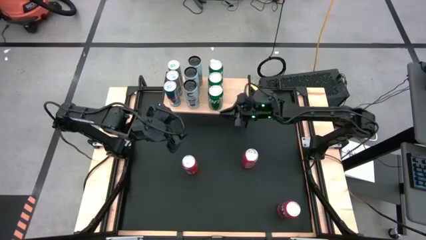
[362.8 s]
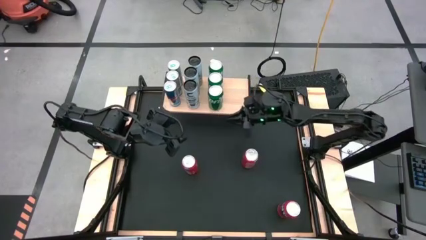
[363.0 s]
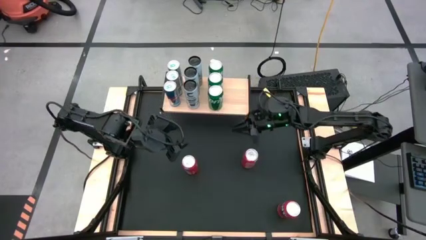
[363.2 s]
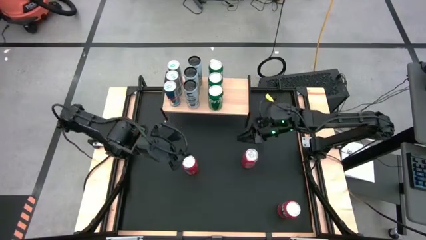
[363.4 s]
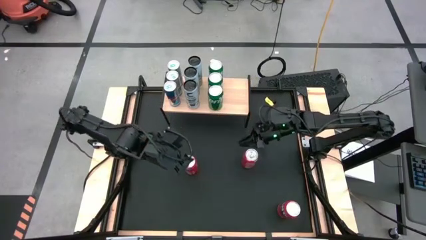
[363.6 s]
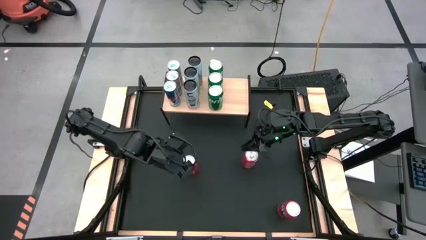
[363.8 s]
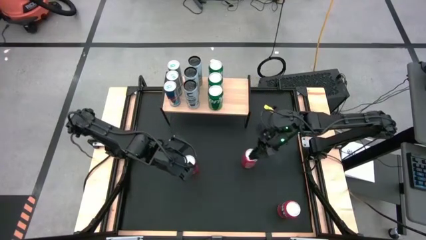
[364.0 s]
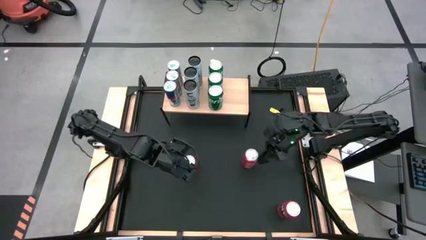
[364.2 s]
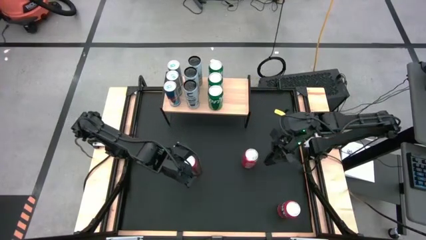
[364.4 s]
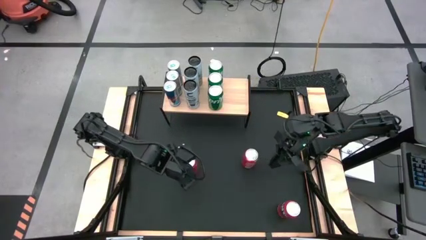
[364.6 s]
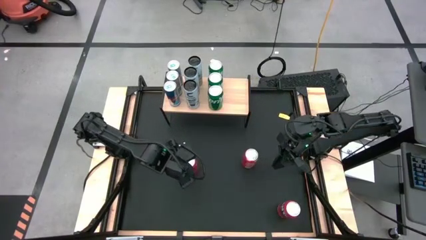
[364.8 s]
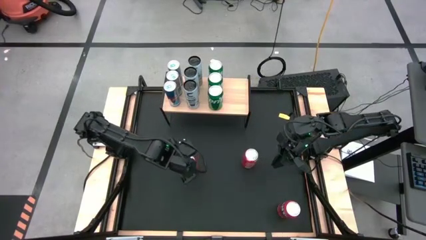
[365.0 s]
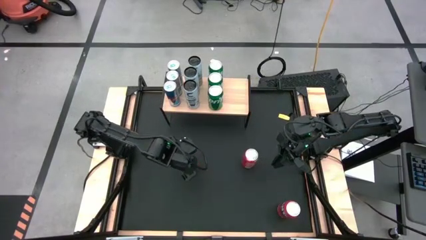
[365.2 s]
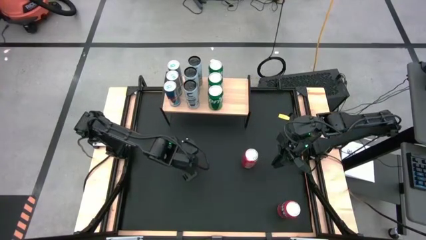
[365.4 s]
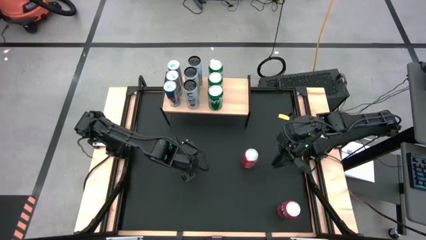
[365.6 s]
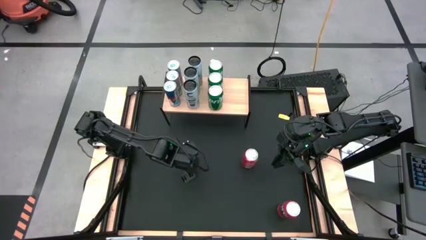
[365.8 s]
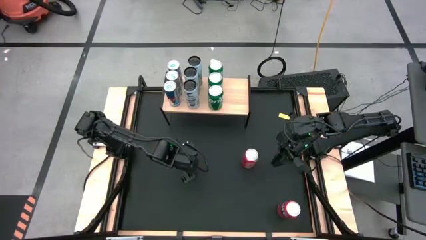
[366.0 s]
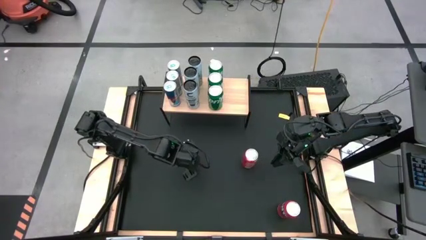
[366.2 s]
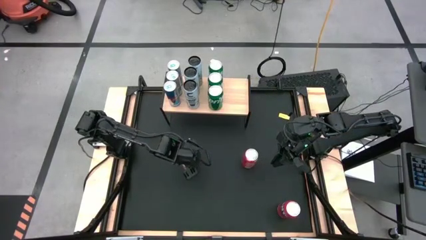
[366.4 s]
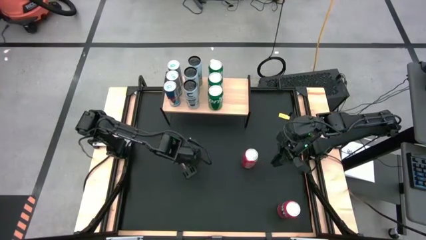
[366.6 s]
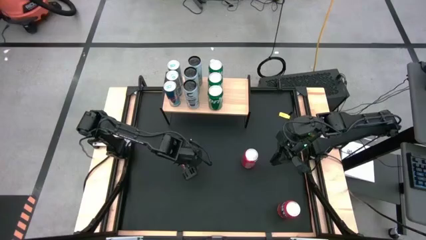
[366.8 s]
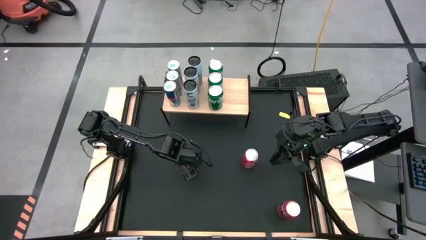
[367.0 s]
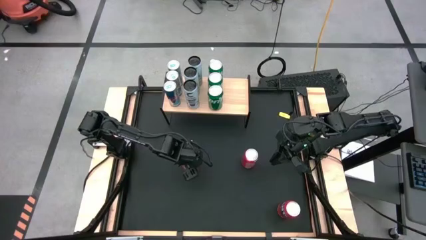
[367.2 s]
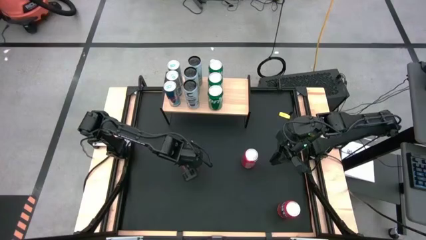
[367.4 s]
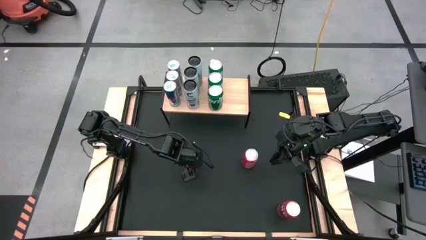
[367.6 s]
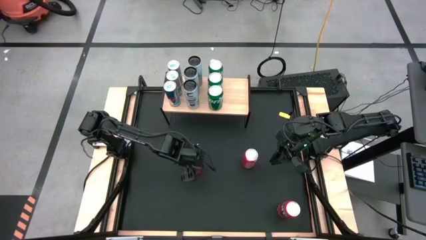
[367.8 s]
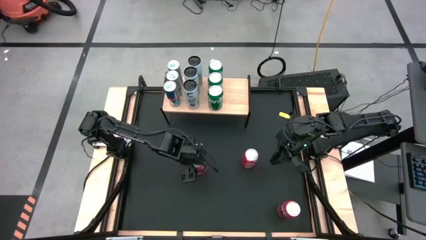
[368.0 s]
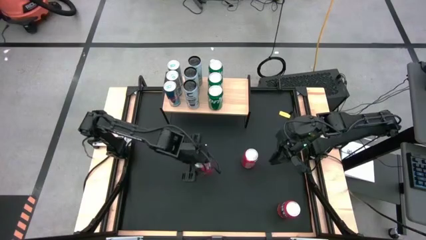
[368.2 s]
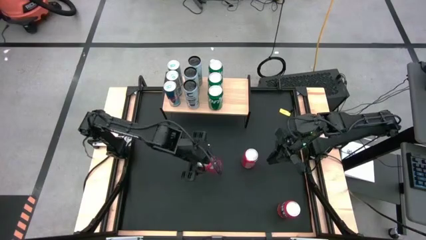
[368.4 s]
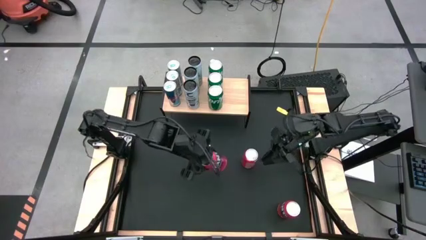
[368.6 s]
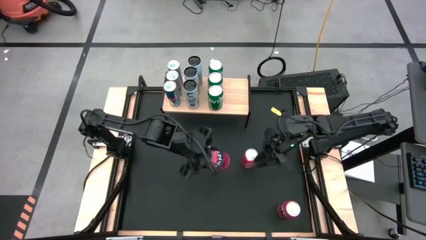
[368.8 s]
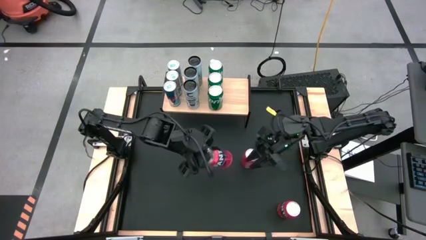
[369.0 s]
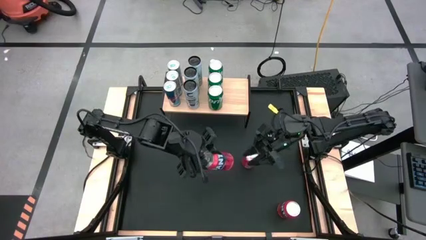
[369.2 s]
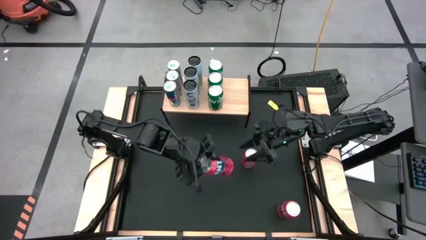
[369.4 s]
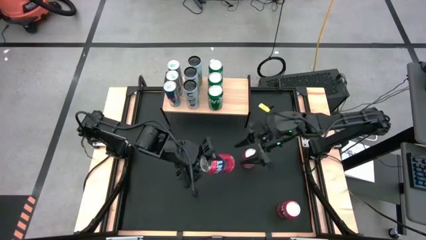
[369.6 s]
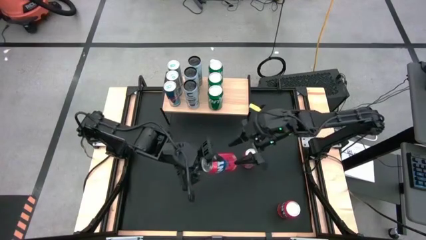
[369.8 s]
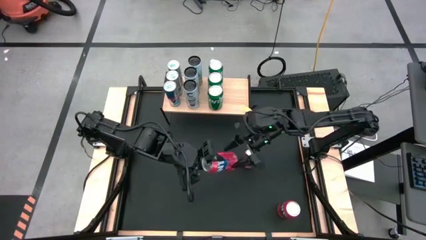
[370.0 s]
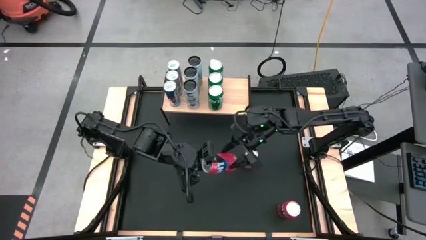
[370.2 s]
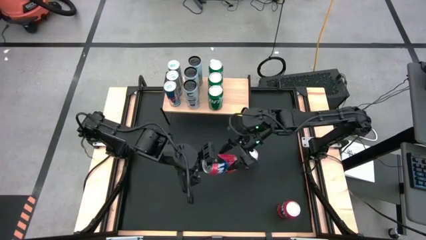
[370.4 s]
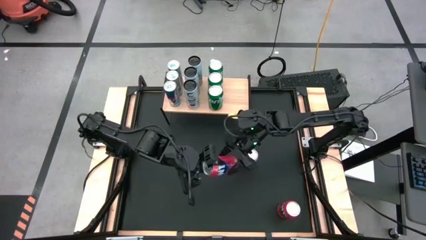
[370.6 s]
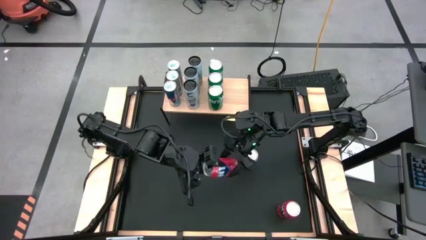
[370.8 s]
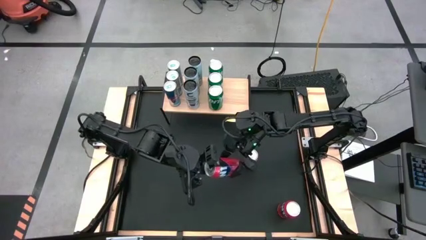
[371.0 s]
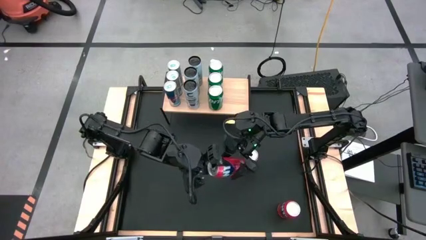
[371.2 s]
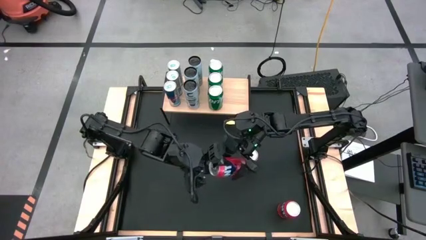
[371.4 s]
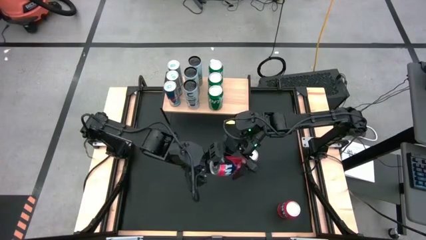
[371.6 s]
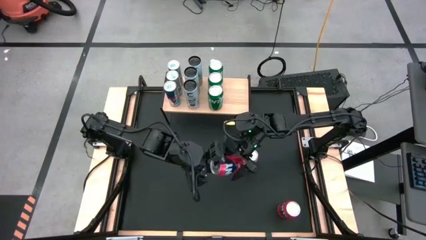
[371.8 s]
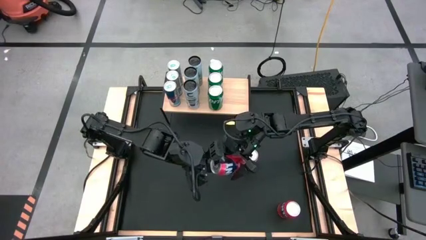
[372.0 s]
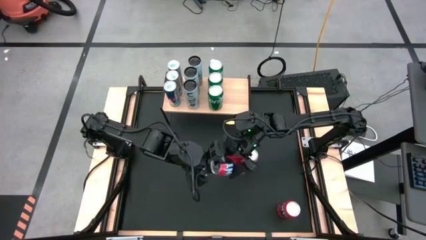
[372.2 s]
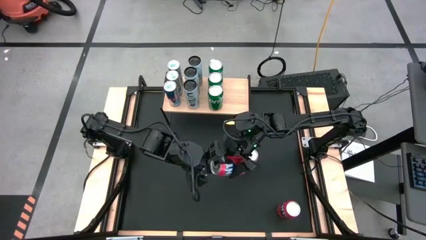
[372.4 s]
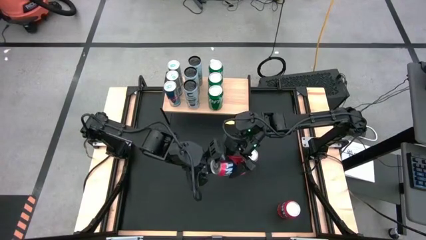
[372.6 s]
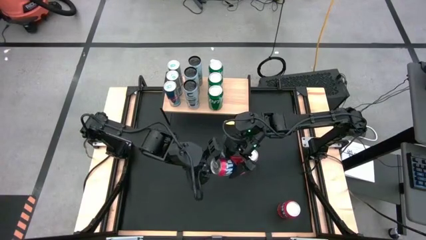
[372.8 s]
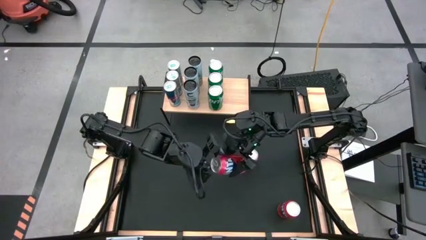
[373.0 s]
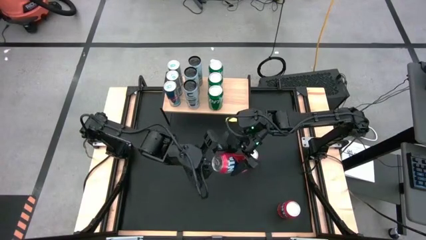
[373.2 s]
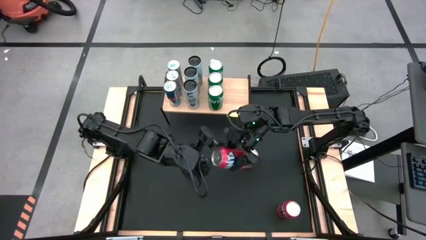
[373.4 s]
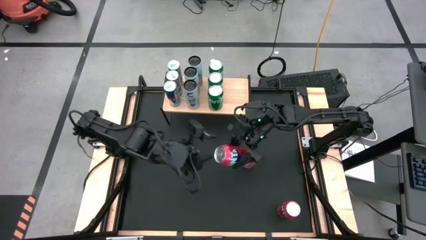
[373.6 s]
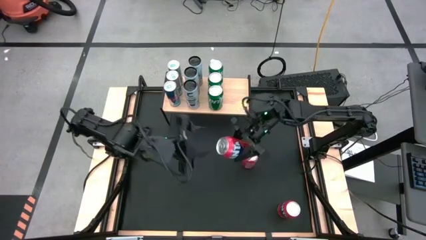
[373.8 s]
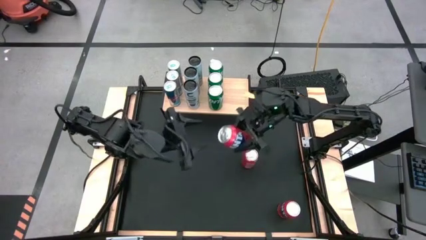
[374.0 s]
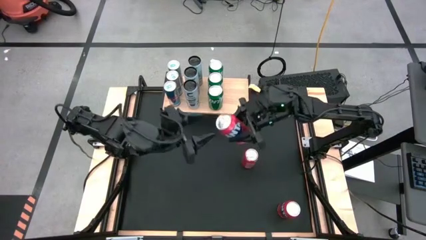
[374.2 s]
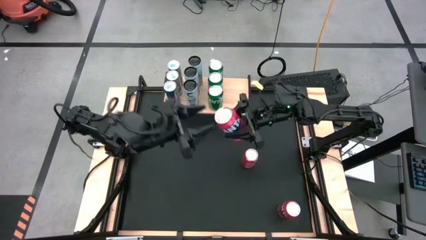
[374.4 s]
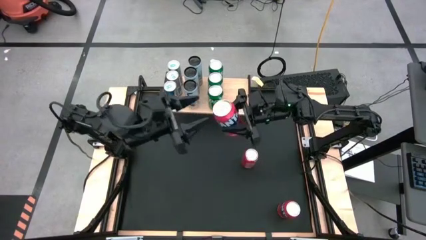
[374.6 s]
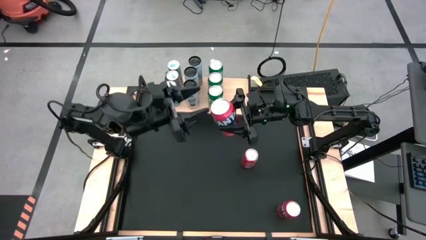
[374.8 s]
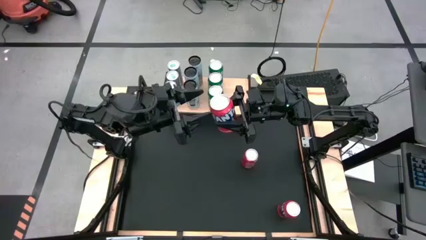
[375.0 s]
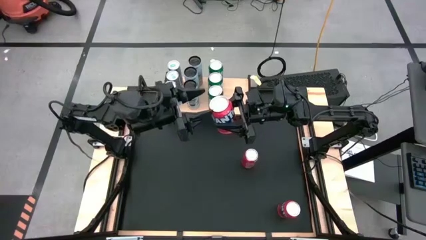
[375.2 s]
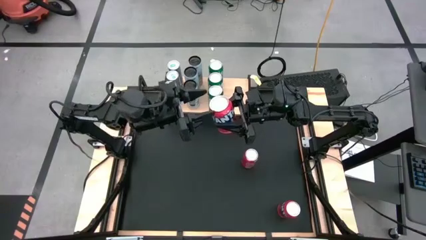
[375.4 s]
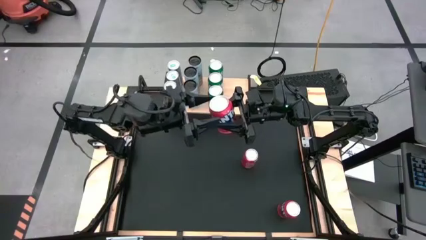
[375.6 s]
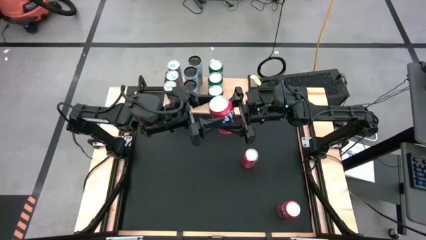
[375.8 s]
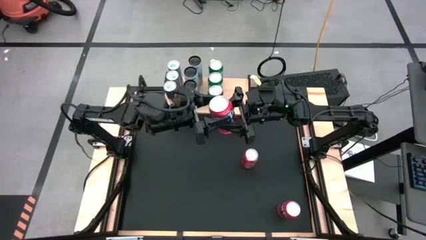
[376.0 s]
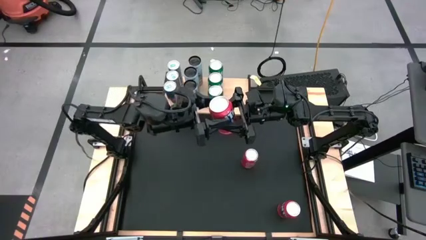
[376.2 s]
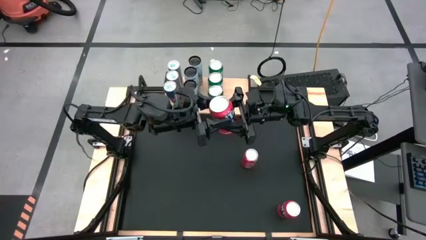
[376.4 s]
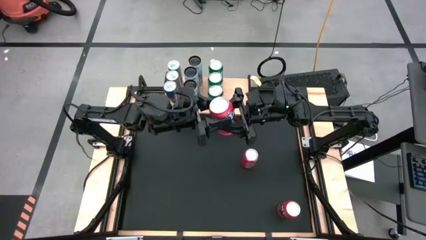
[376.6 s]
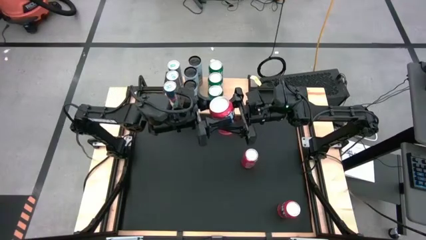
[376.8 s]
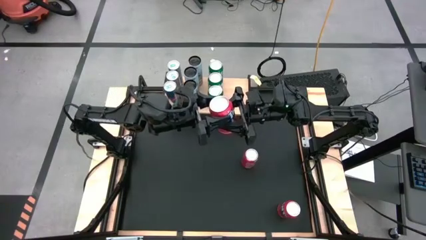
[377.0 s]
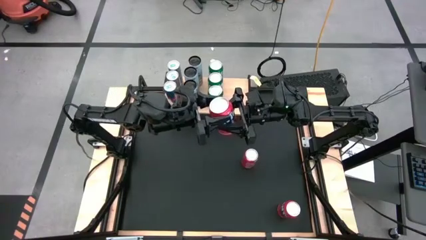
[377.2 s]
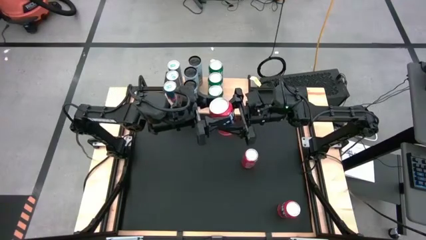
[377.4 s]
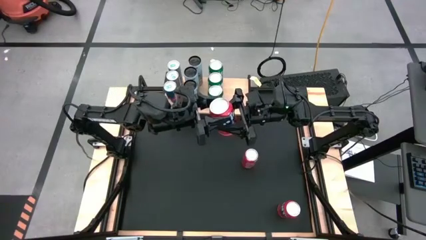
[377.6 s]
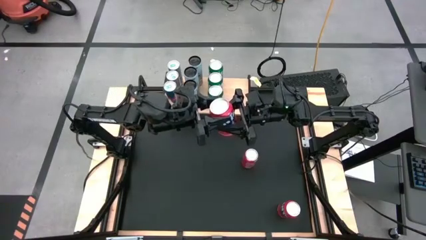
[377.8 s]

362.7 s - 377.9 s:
Task: Place canned beverage on shelf
Put the top left orange soda can on the shelf

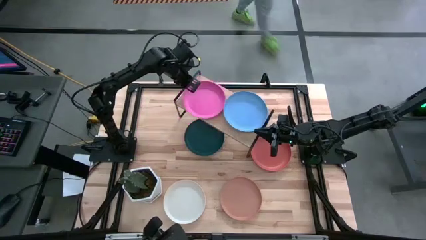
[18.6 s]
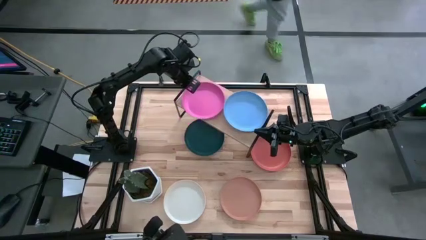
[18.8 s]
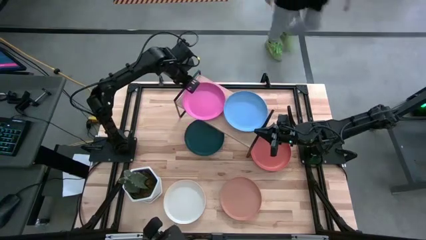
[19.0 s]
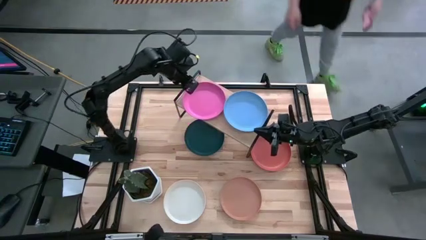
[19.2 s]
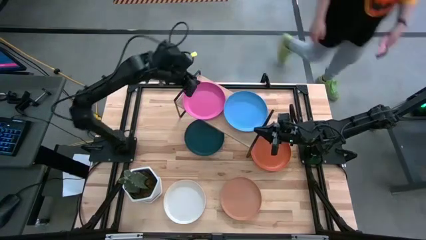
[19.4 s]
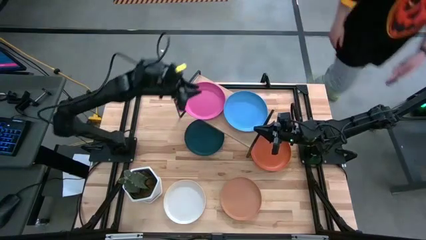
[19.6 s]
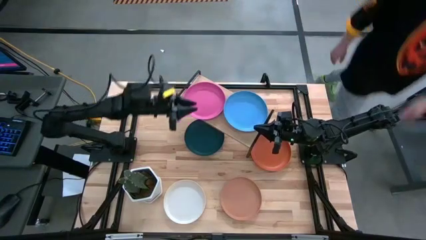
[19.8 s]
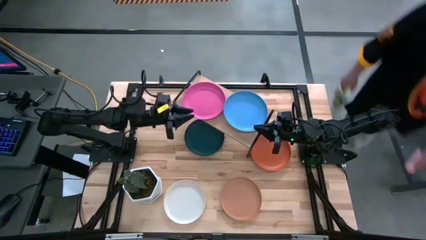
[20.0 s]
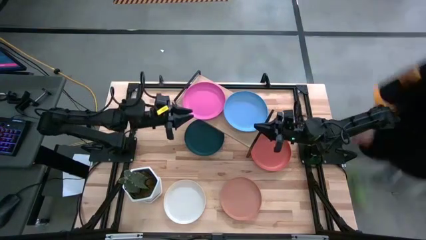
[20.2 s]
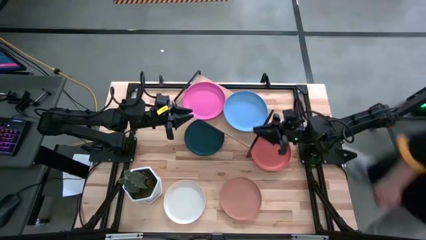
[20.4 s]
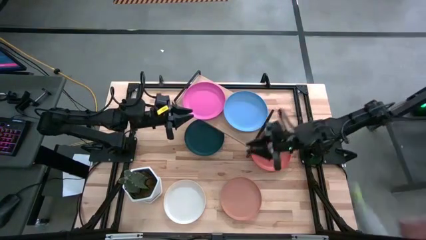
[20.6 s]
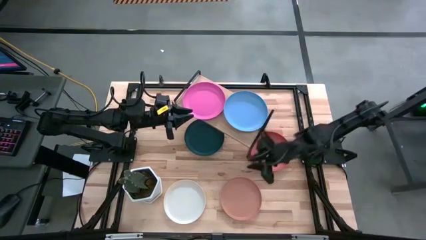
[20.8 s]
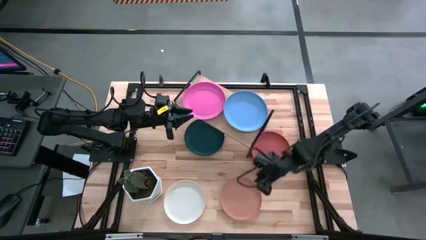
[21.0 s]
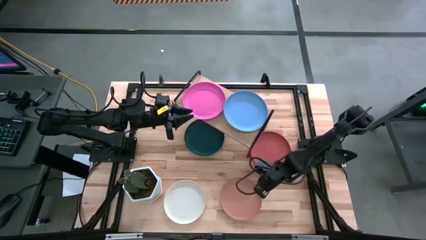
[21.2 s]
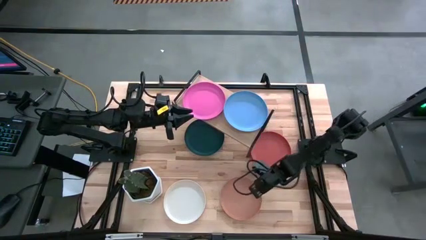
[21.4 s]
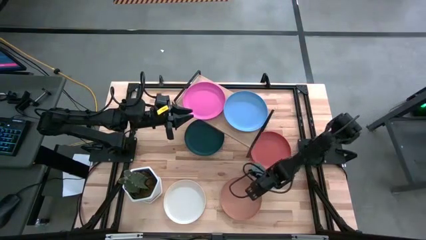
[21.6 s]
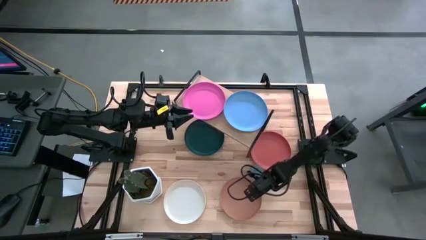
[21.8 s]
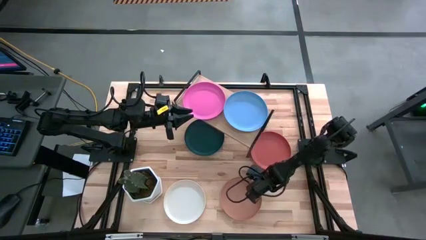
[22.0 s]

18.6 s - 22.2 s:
Task: Place and stack plates onto a shelf
Stack the brown plate on top of the blue plate
